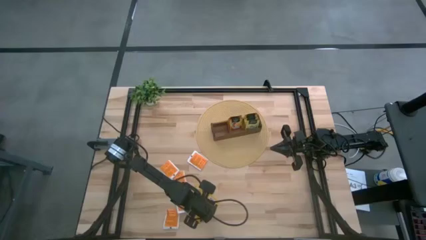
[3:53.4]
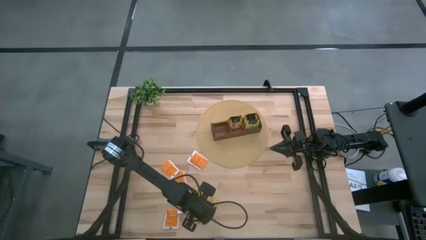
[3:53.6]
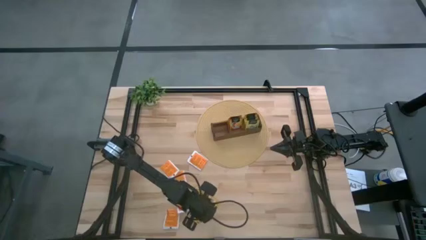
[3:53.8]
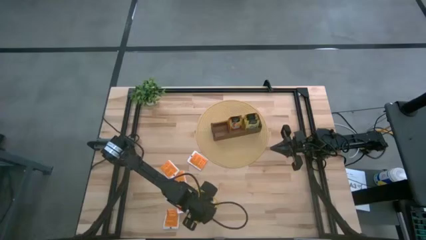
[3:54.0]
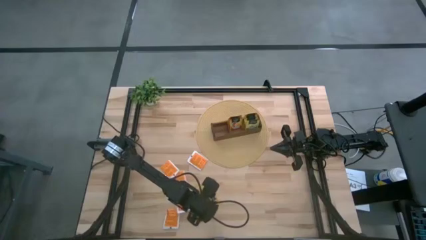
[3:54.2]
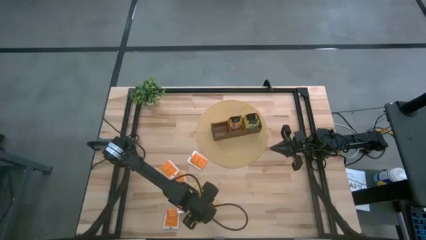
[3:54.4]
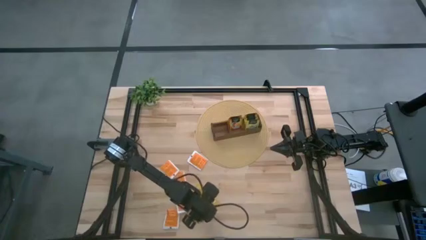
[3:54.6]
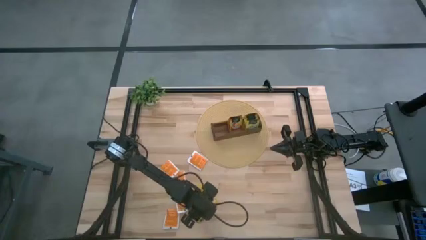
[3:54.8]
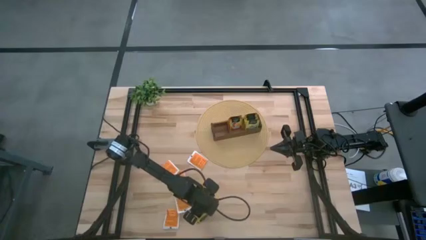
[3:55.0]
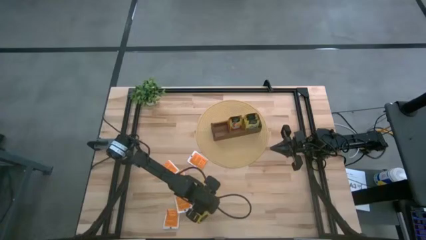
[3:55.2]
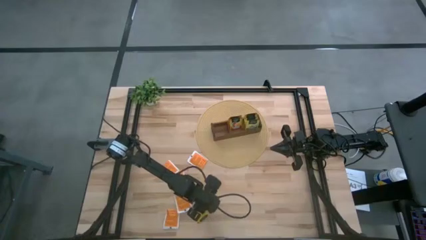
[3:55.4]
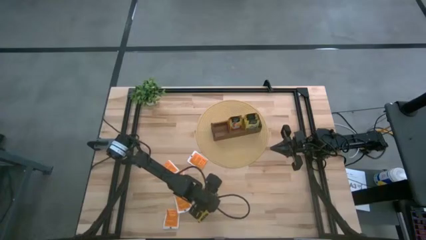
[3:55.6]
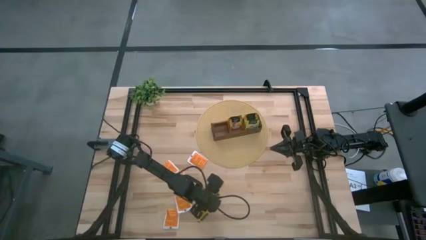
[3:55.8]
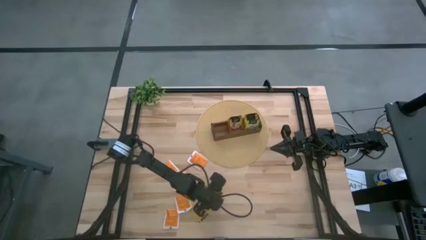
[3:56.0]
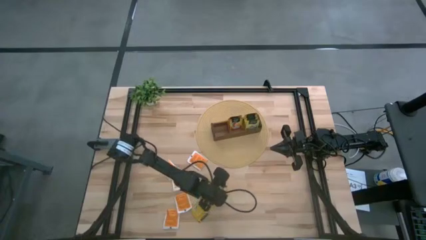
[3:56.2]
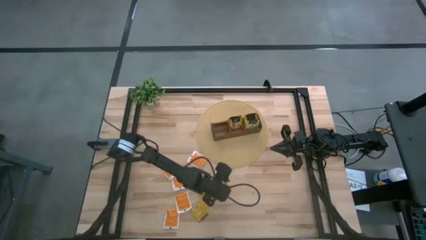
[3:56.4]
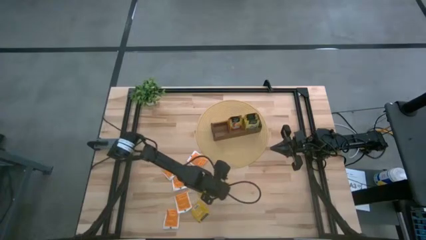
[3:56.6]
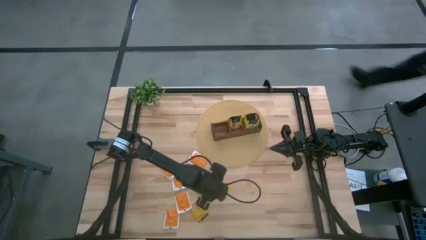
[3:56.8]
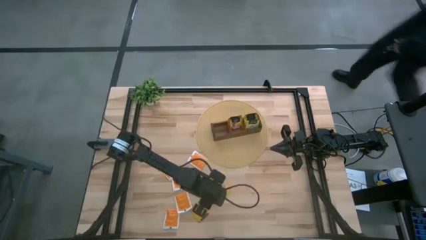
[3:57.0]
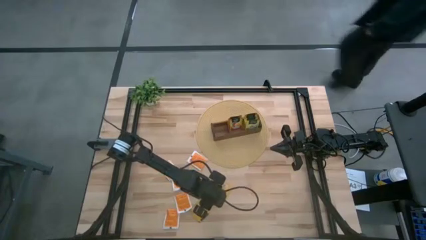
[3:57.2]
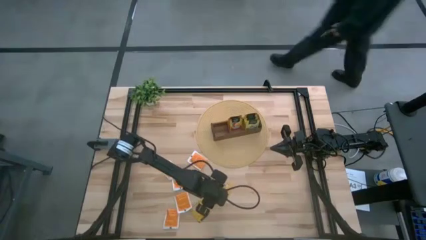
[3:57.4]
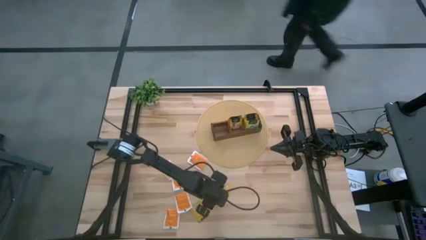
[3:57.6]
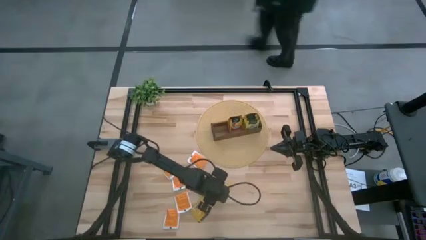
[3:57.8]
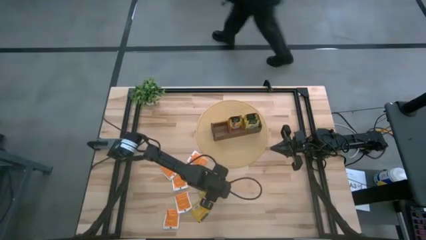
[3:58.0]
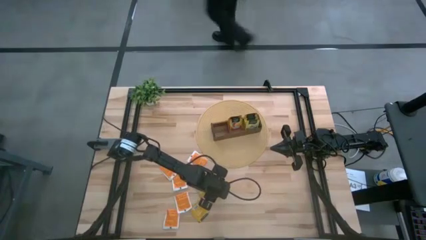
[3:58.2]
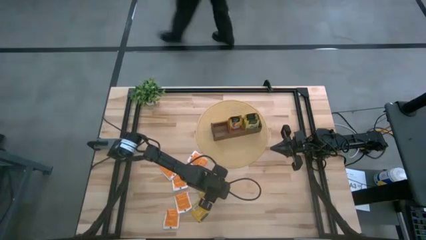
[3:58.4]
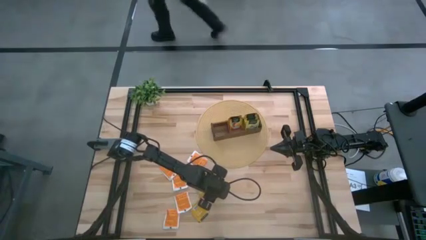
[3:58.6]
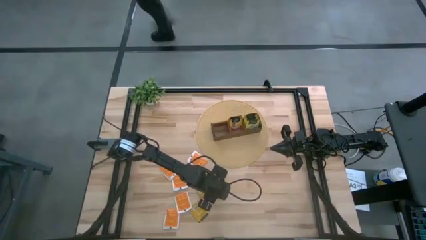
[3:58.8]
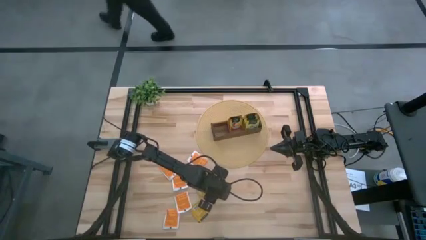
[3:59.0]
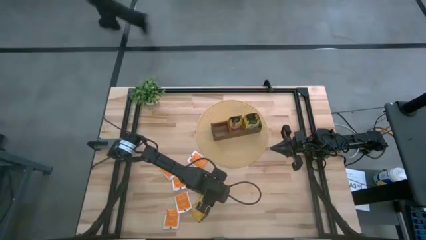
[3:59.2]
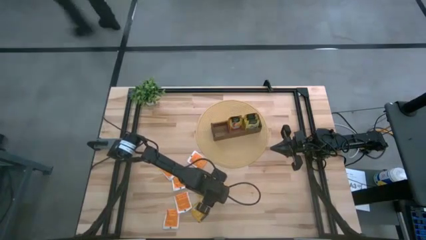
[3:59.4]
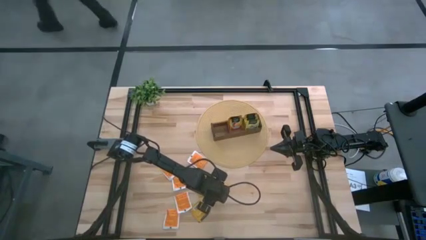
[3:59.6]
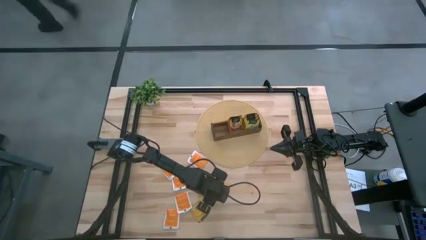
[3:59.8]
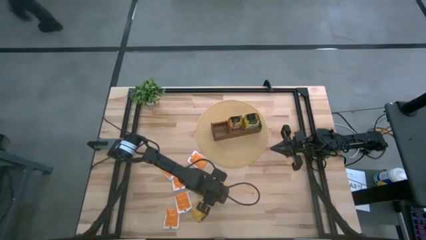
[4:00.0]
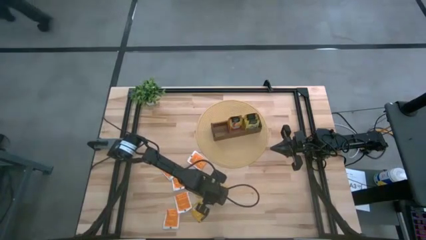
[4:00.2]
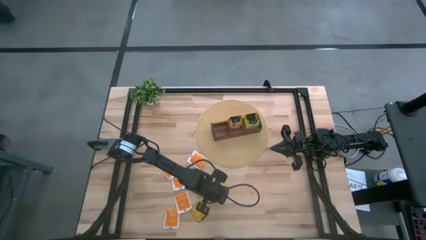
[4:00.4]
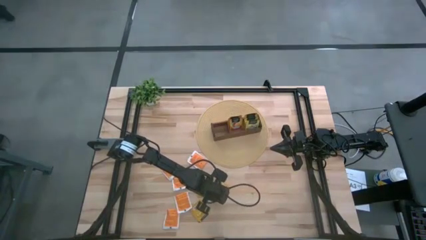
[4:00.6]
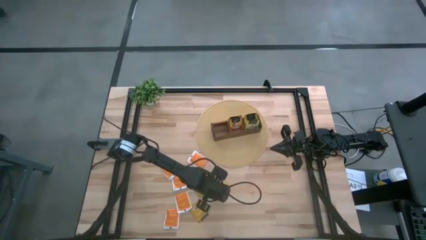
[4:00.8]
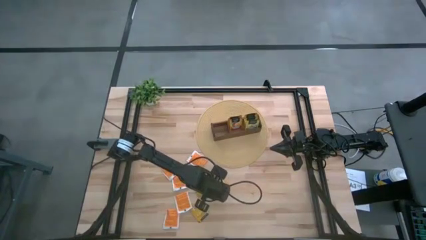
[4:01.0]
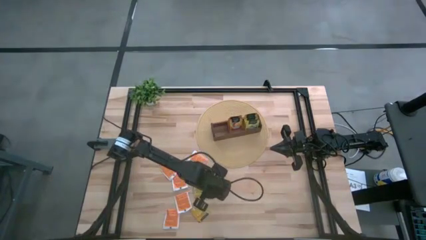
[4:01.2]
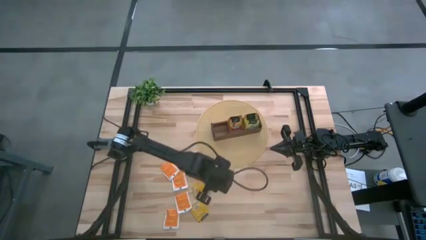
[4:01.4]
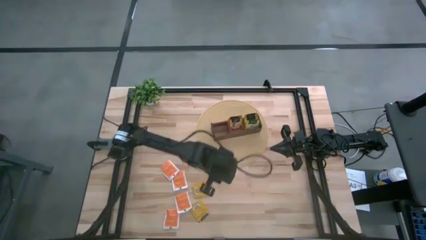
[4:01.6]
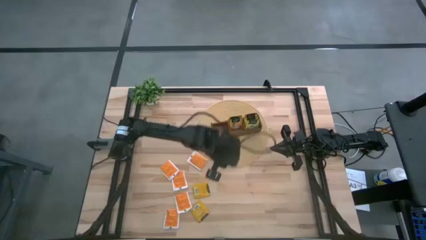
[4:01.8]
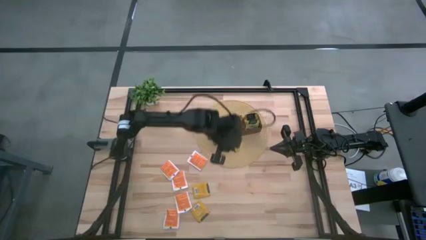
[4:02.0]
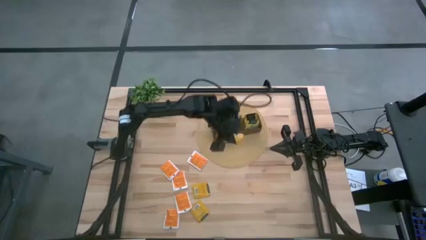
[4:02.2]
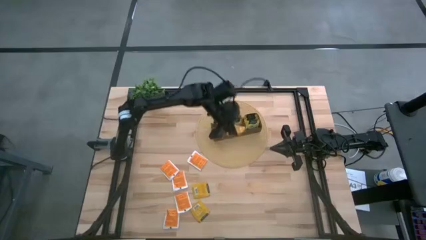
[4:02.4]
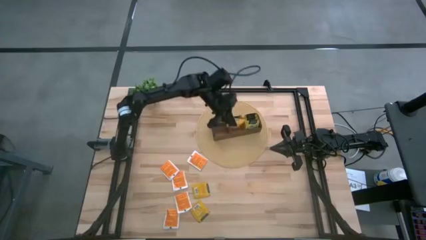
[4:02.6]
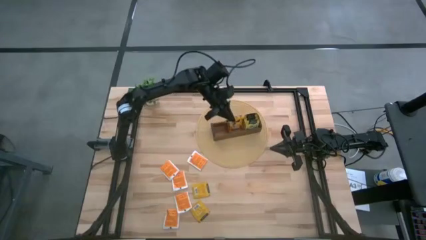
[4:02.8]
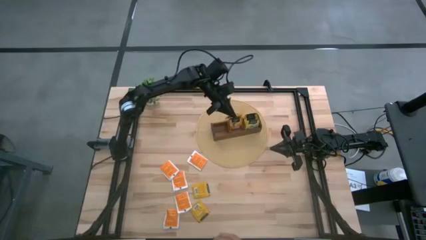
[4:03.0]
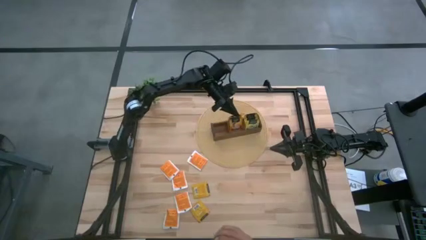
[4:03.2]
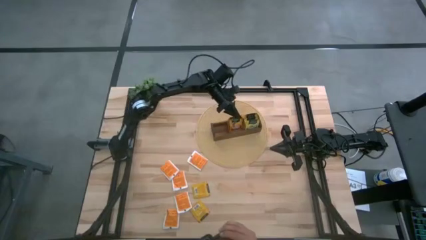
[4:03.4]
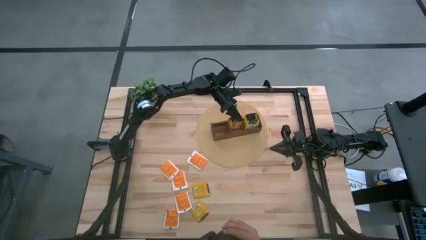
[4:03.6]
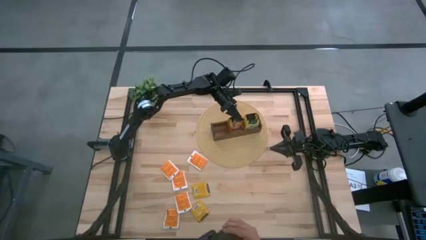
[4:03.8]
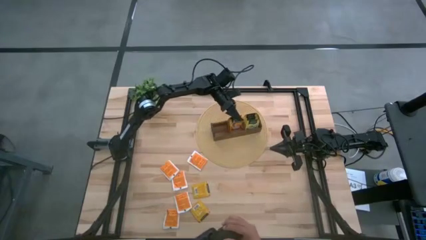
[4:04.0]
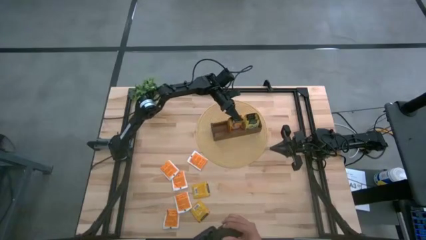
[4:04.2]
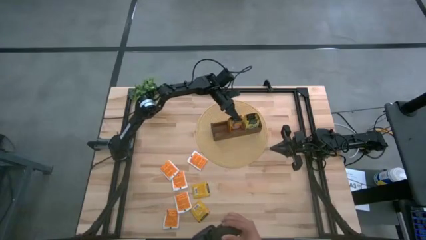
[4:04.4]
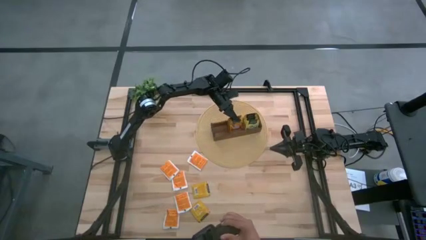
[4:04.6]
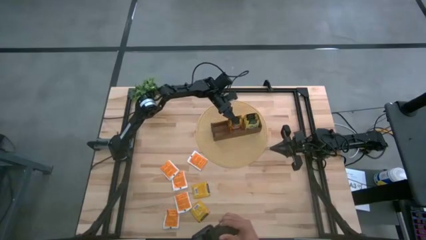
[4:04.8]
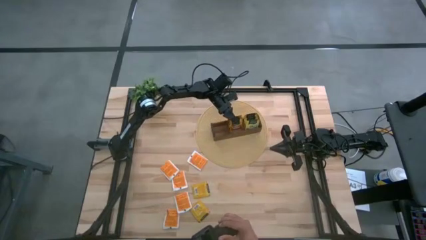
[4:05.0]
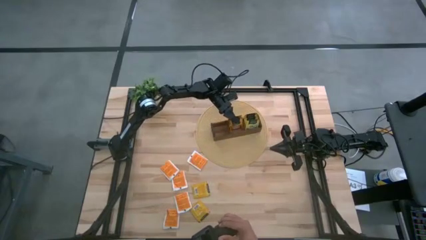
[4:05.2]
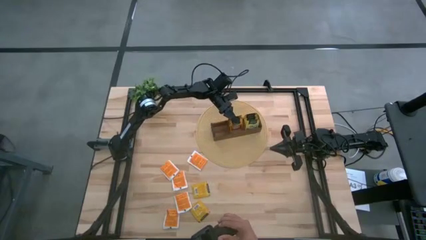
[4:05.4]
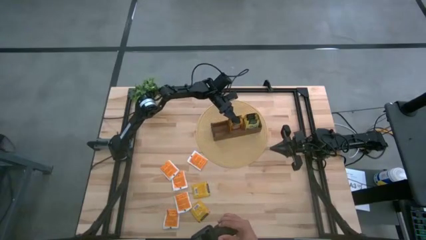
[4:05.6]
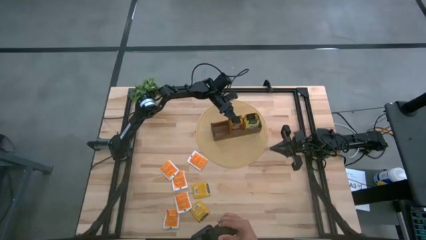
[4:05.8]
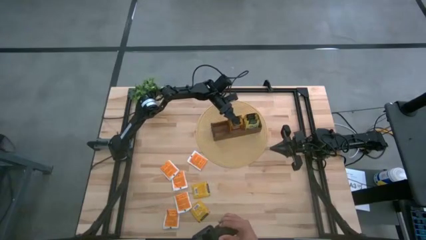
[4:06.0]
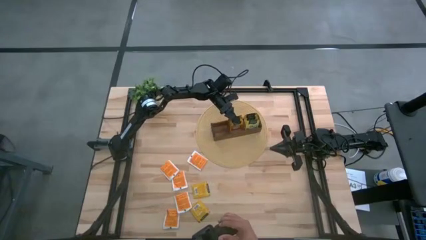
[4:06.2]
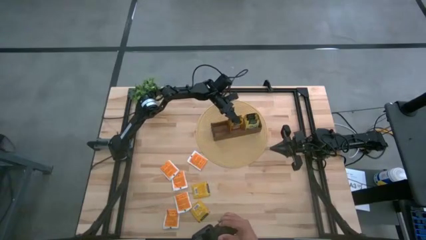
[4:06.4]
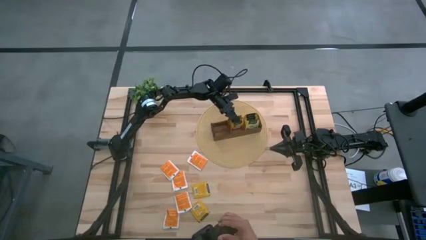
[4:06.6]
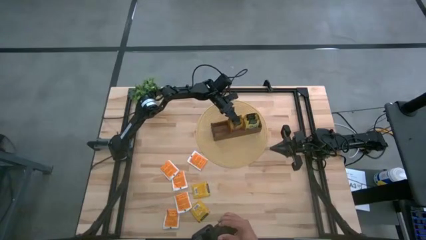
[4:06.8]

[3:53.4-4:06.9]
Task: Pick & Place Tea
Put the middle orange tea bag into the middle section of the wooden organizer
